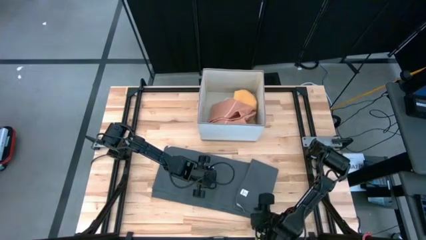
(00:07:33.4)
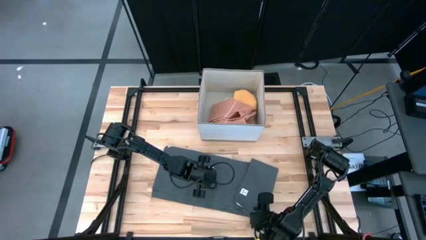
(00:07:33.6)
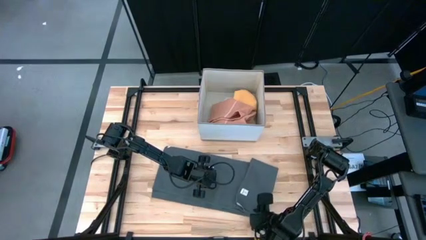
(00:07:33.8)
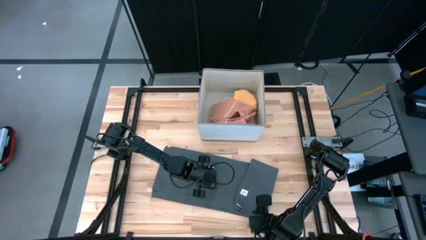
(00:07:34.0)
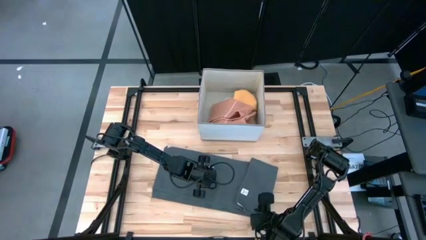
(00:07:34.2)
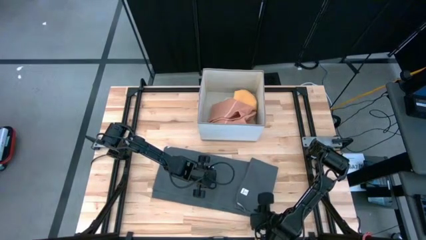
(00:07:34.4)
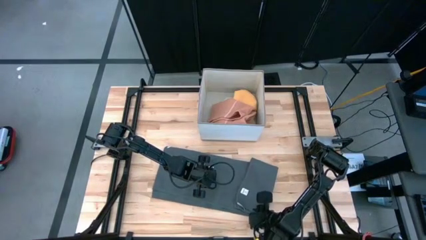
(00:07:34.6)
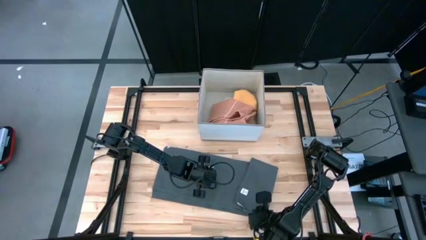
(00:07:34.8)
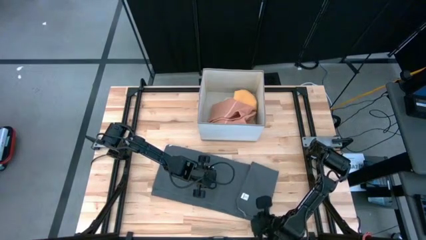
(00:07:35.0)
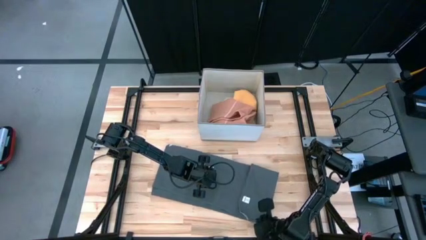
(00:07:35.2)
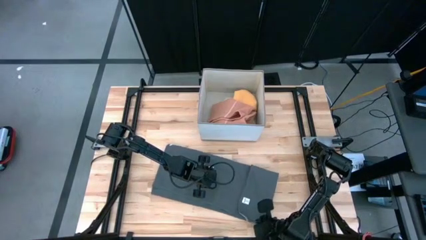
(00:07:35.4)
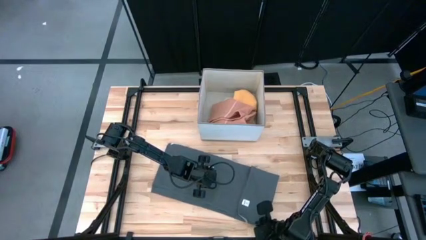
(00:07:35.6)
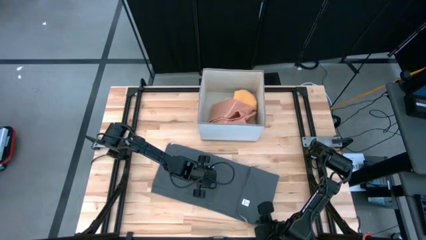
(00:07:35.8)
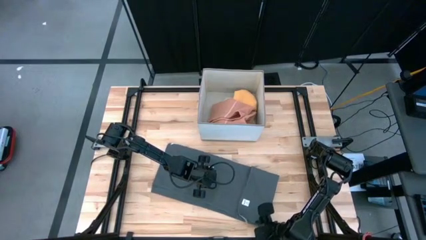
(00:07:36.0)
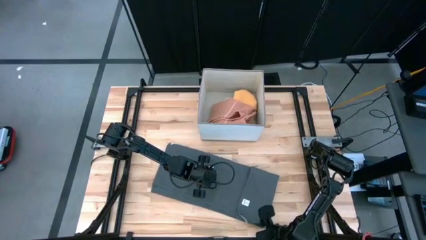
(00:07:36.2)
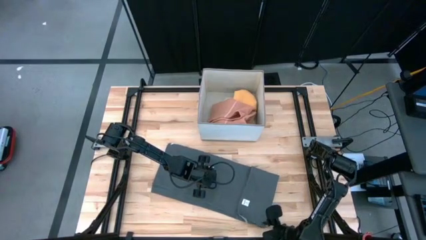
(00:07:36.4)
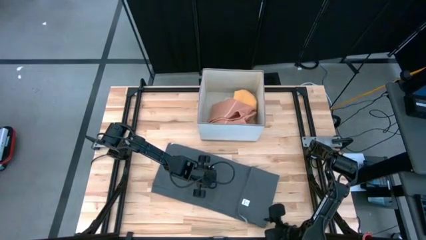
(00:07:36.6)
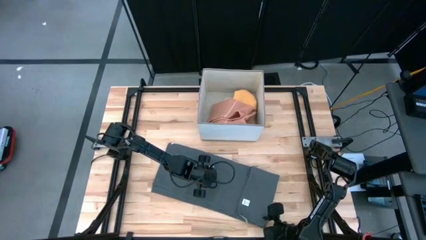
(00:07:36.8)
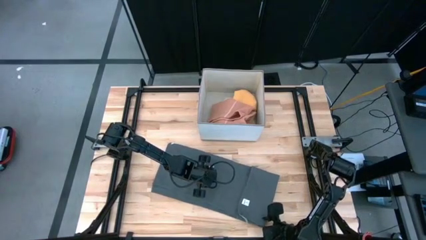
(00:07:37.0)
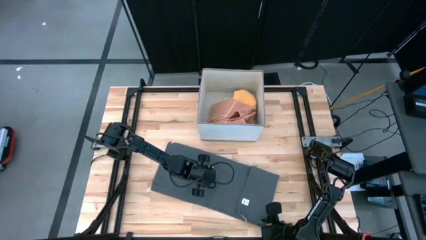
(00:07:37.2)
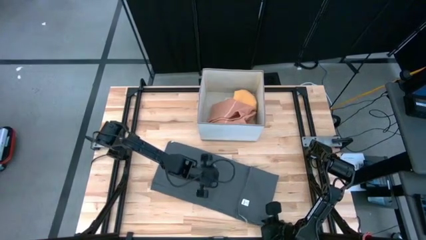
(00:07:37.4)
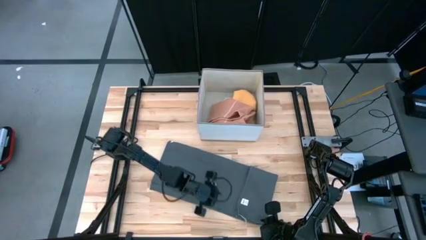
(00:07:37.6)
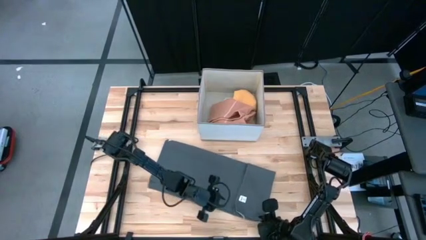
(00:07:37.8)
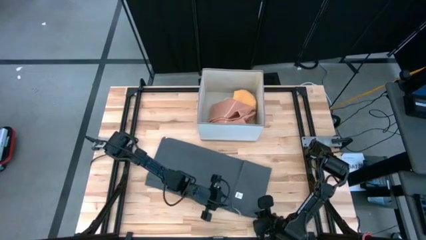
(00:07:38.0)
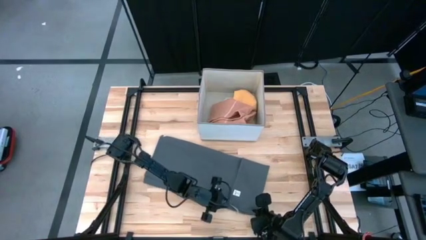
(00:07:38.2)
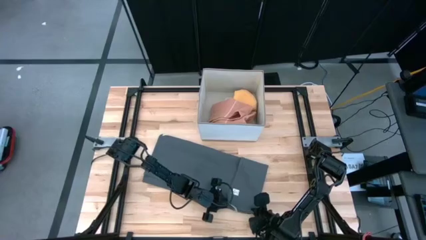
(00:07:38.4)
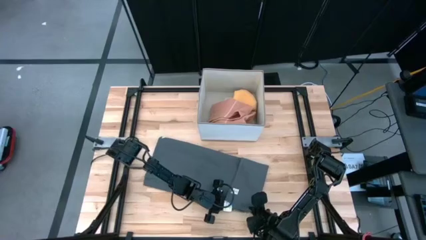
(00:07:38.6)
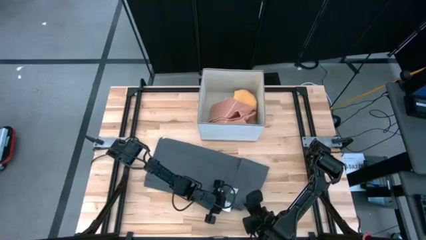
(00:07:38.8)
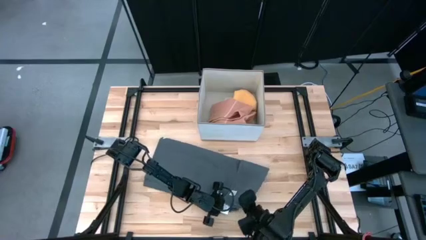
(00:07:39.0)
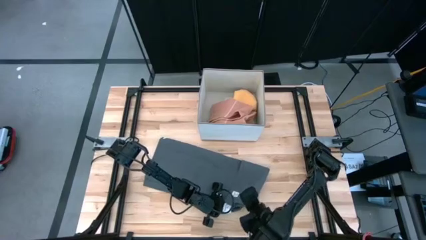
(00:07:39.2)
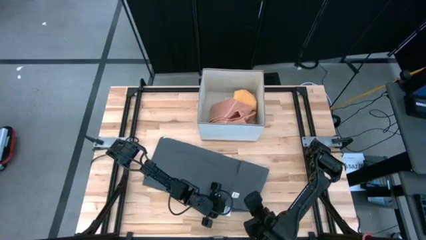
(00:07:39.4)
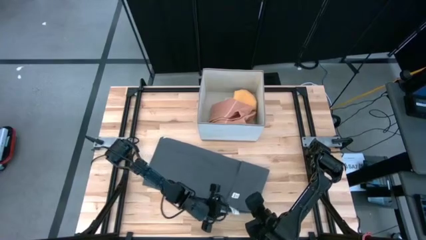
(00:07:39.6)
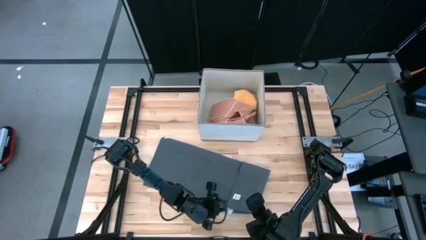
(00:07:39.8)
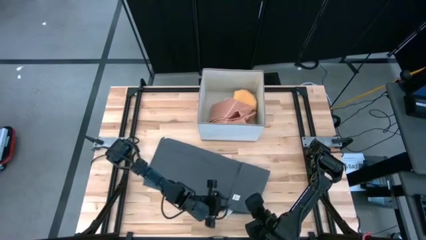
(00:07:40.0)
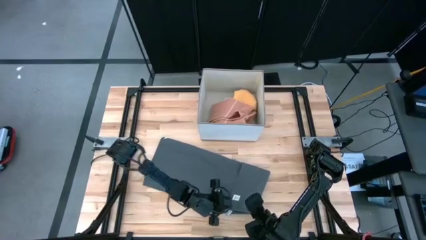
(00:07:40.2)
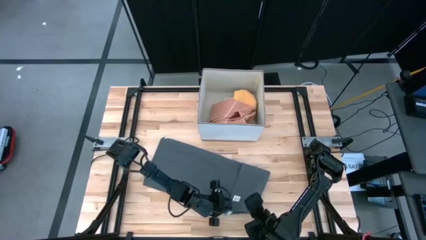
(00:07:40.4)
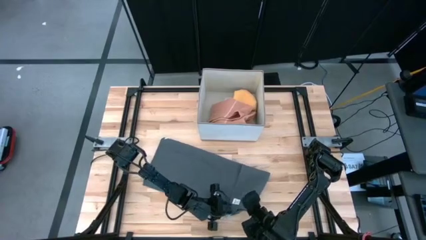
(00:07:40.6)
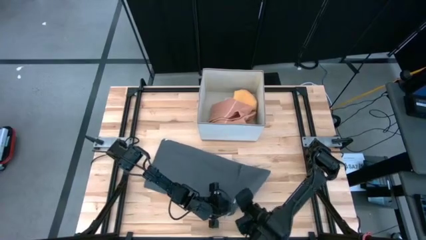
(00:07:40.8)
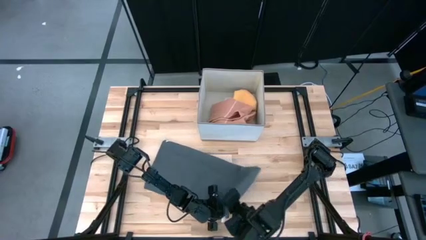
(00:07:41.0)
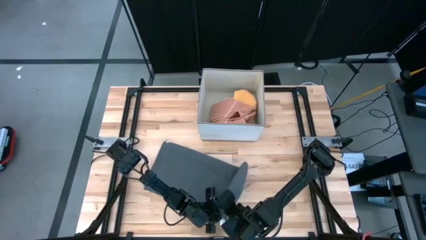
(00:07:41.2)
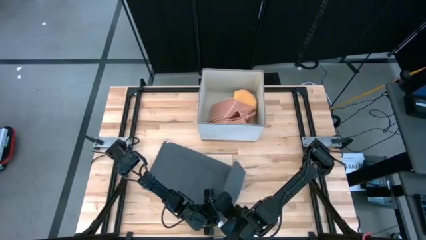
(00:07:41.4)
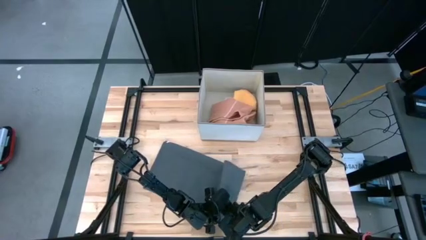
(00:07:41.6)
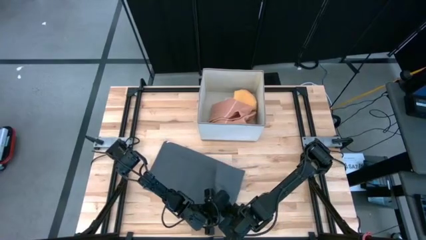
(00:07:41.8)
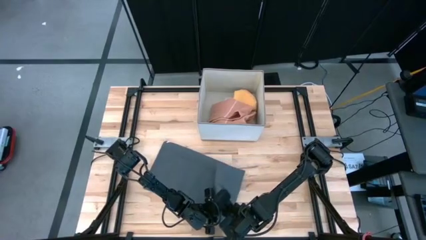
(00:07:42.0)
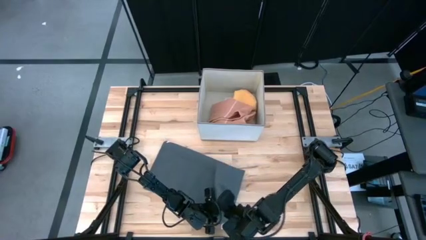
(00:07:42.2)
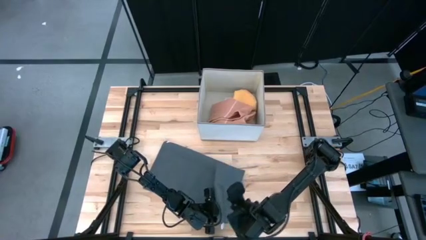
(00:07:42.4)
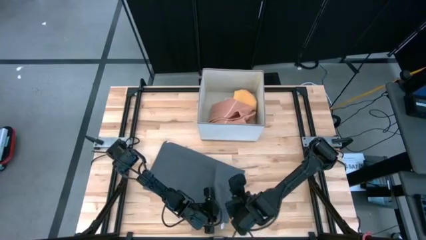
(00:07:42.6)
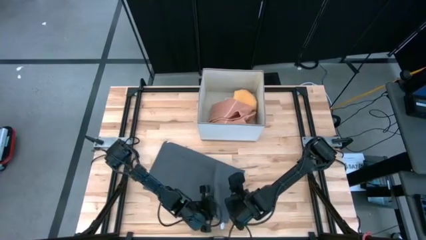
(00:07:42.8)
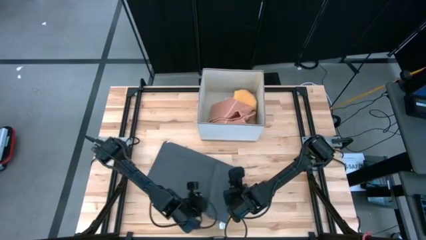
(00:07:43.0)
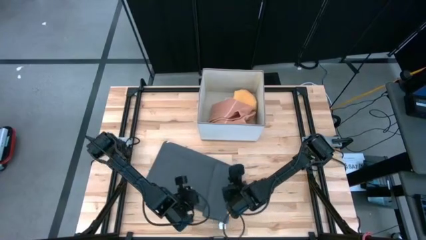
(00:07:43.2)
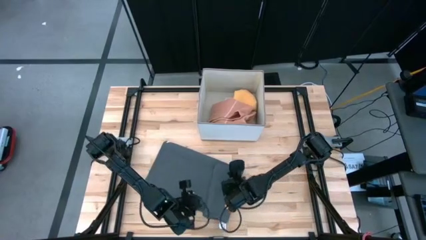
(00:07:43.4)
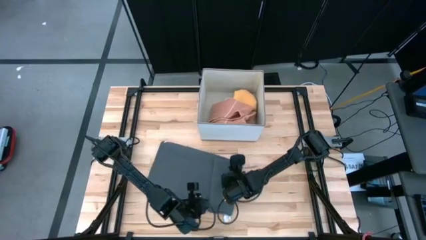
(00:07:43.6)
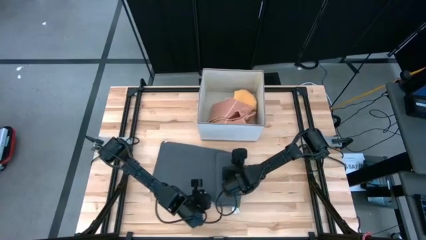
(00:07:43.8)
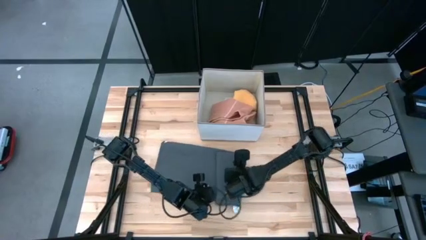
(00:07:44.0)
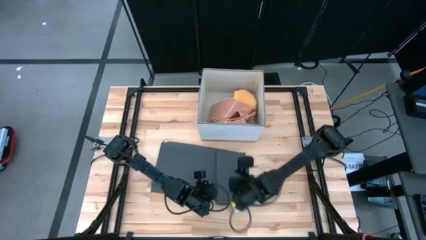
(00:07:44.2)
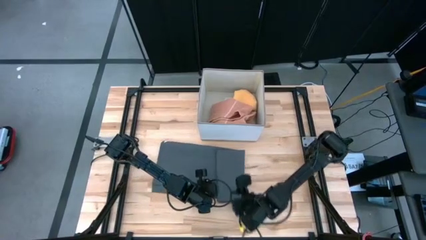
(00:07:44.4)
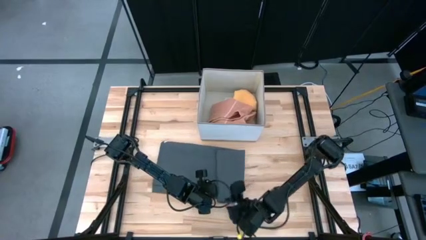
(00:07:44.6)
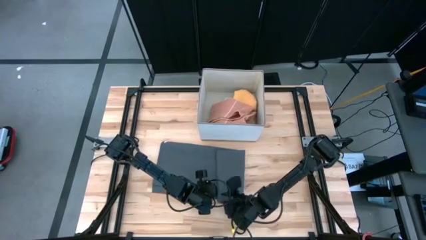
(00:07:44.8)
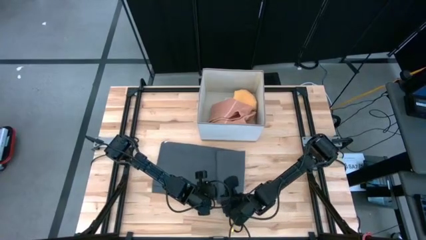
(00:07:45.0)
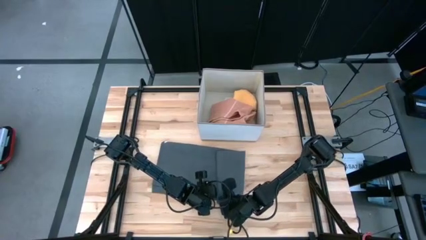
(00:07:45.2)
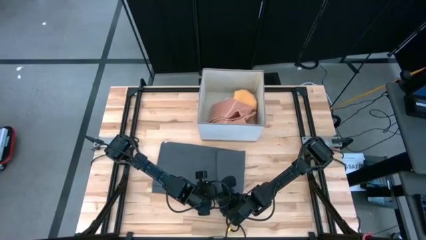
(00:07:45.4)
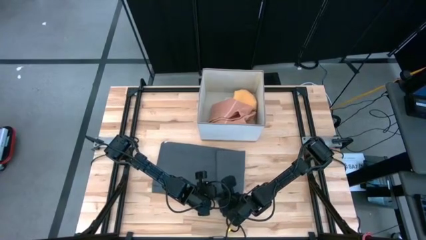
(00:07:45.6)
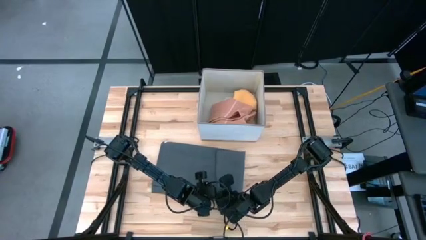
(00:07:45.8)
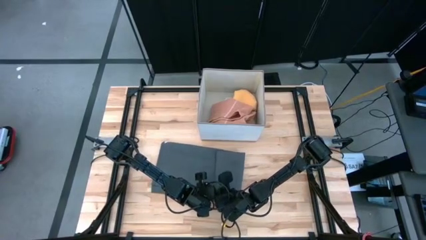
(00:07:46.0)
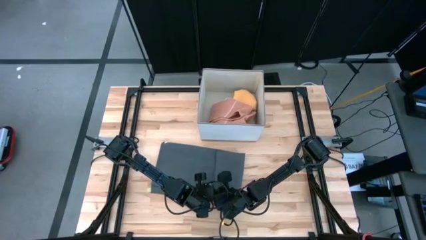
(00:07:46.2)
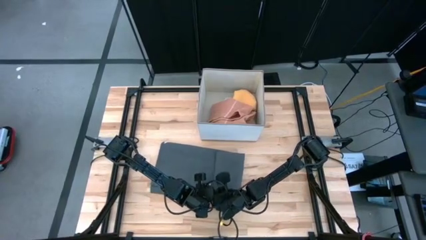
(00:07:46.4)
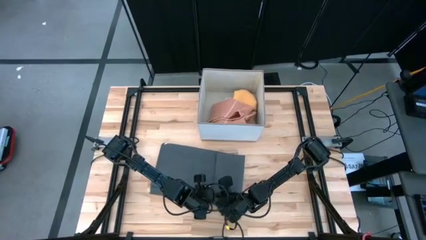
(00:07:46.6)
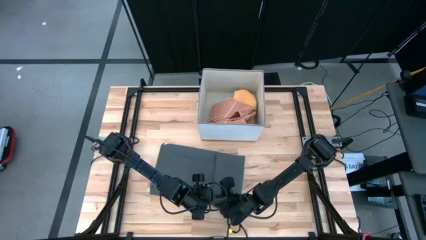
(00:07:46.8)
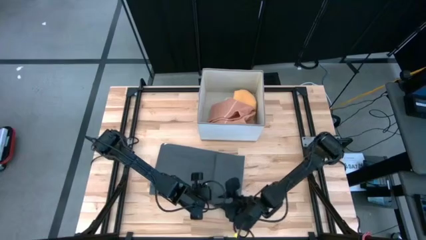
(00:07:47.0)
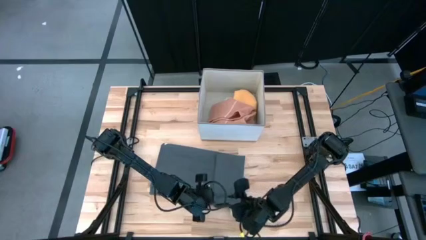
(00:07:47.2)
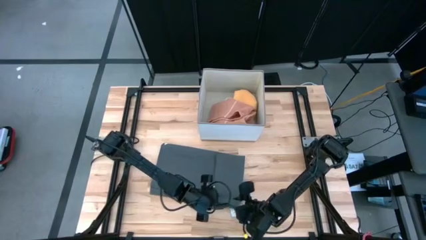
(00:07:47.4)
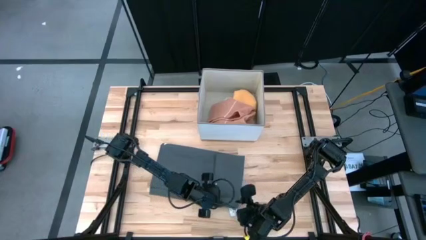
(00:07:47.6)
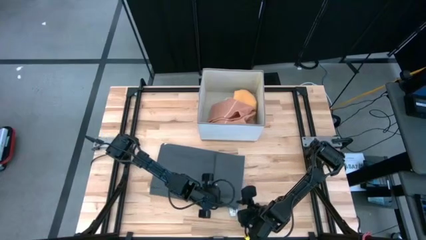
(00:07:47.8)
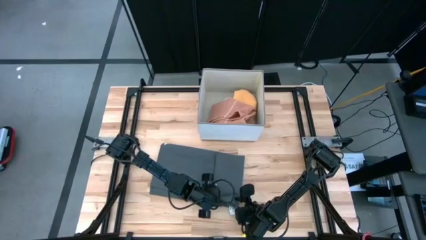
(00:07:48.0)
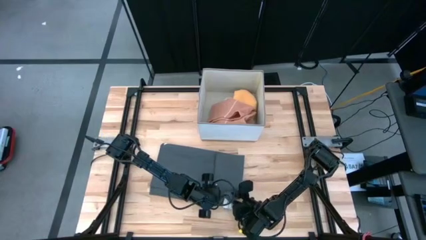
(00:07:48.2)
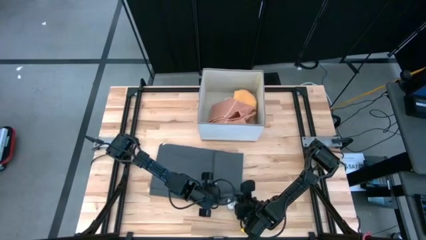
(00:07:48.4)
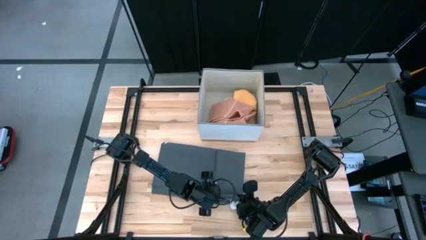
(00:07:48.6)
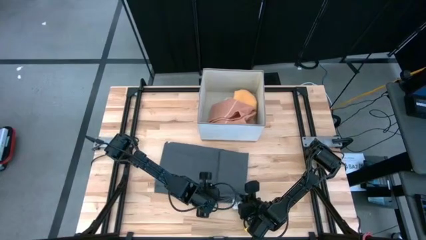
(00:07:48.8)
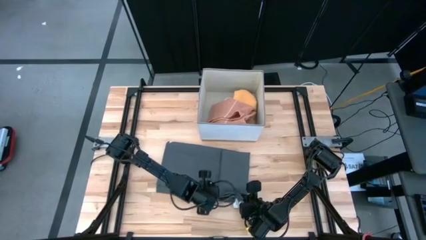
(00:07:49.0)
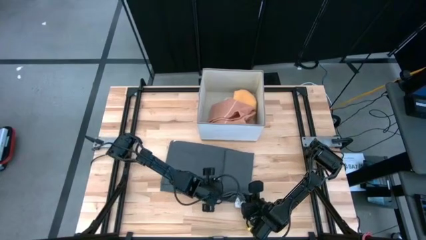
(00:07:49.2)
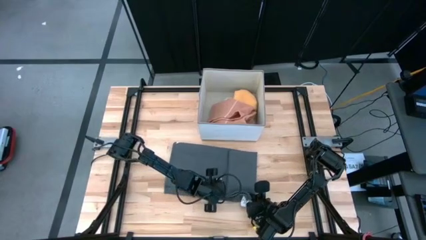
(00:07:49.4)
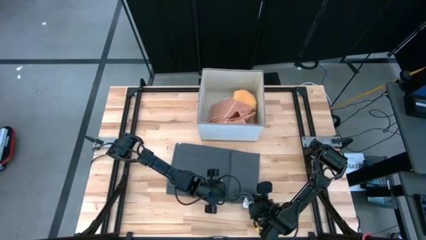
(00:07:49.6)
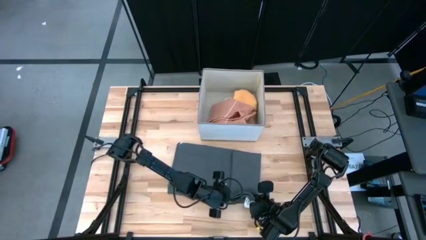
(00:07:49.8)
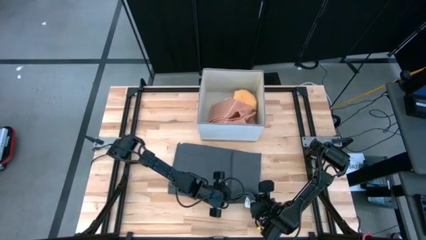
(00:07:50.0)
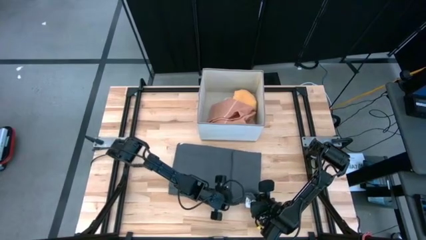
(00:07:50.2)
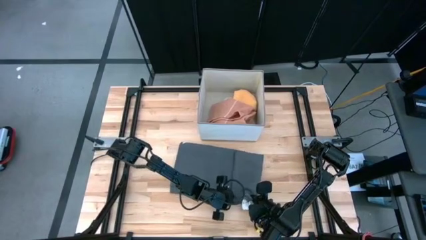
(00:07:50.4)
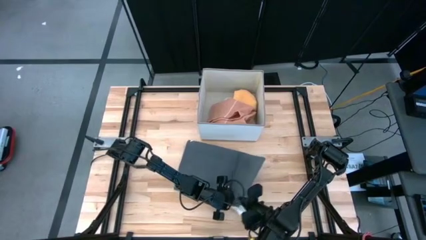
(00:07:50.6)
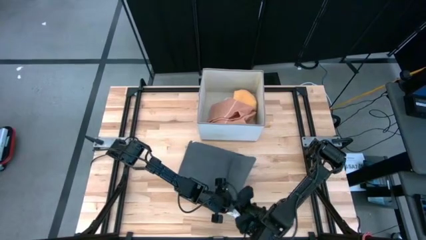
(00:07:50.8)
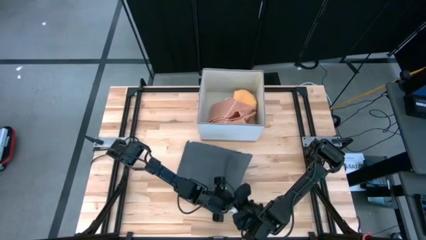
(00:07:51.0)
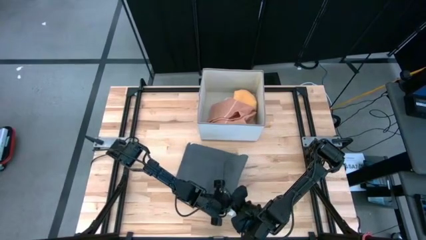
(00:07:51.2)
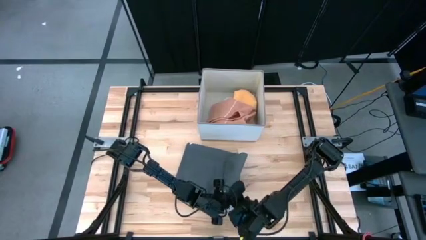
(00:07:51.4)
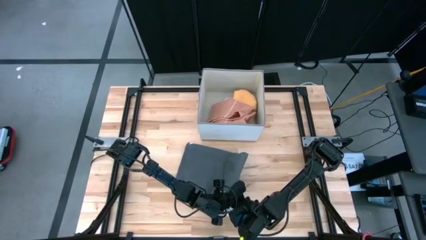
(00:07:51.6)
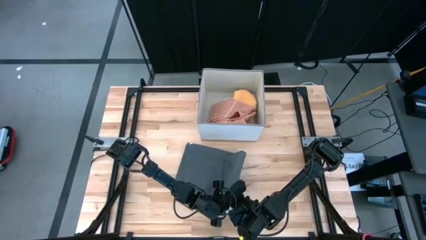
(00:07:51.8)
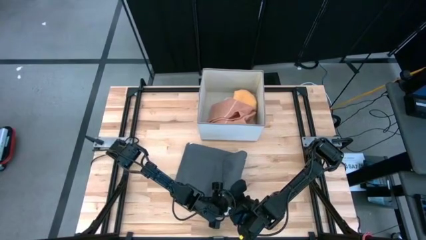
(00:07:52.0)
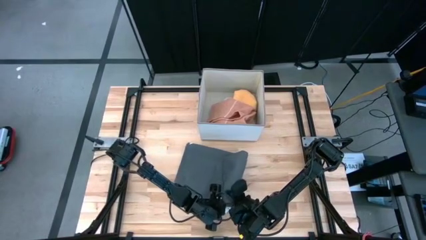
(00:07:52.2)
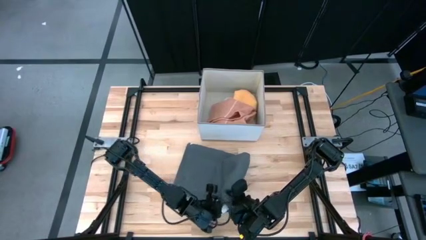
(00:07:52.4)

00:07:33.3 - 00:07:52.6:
Task: Fold towel
Fold the dark gray towel
